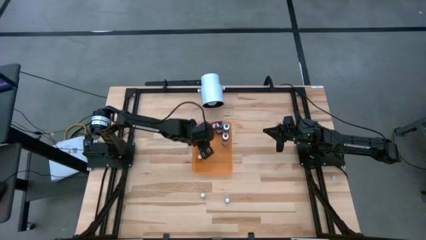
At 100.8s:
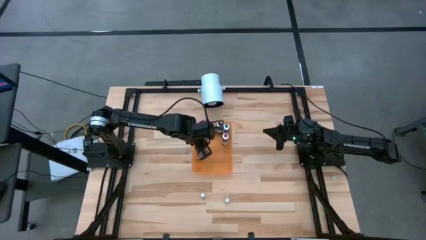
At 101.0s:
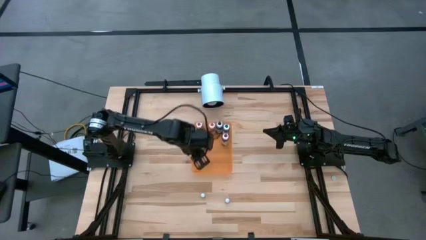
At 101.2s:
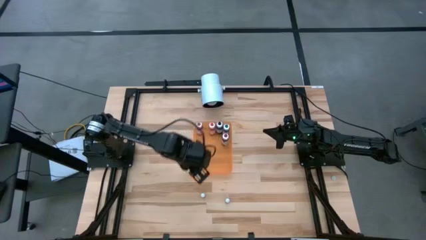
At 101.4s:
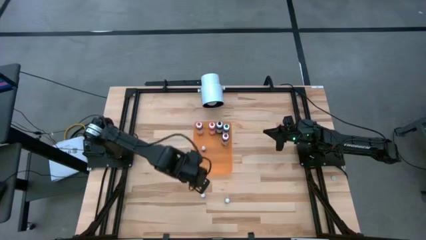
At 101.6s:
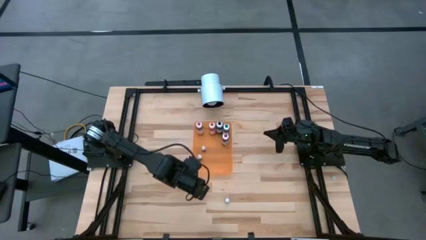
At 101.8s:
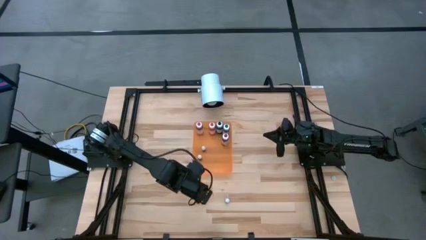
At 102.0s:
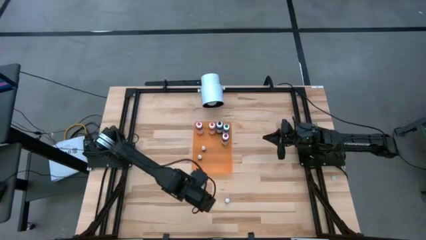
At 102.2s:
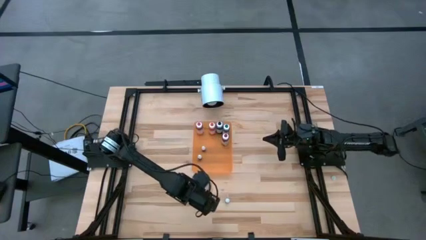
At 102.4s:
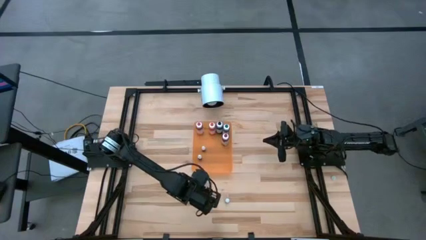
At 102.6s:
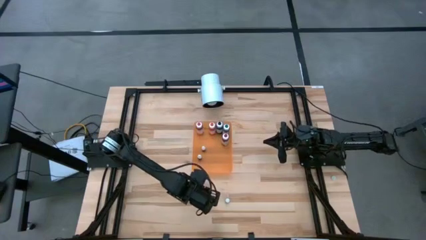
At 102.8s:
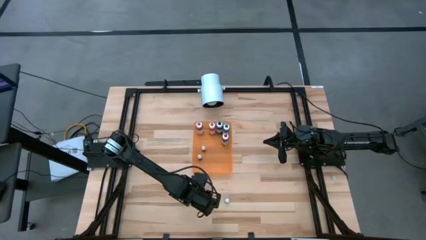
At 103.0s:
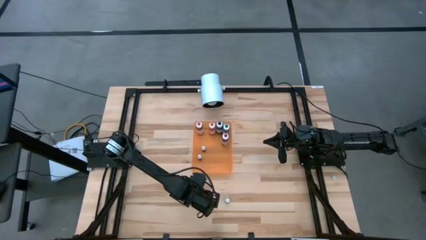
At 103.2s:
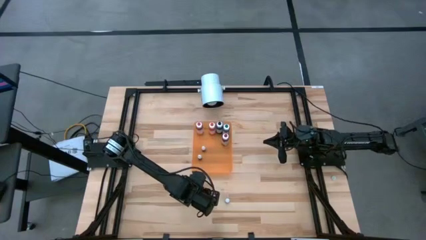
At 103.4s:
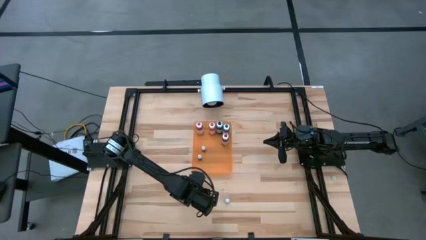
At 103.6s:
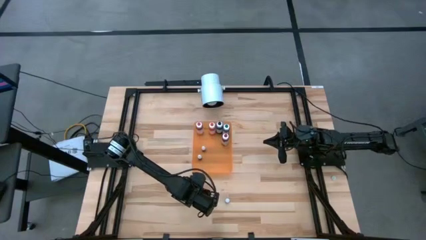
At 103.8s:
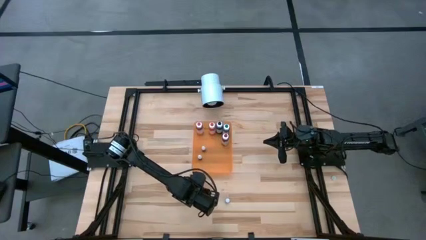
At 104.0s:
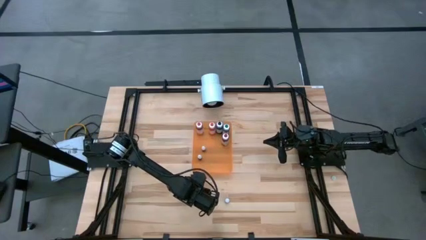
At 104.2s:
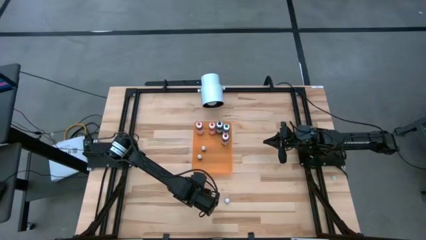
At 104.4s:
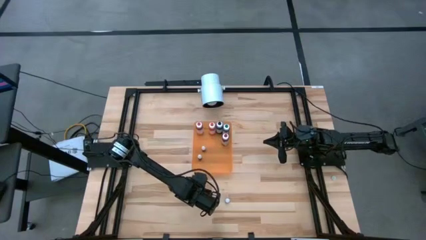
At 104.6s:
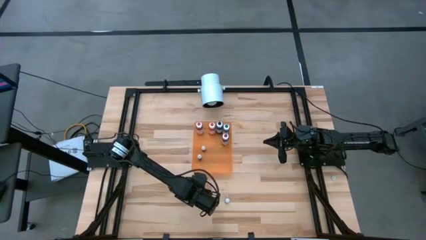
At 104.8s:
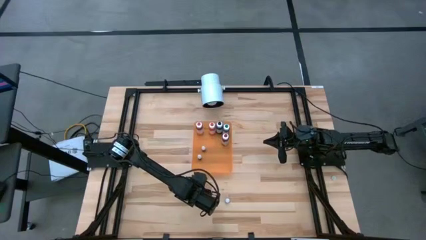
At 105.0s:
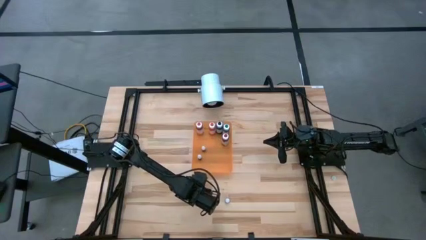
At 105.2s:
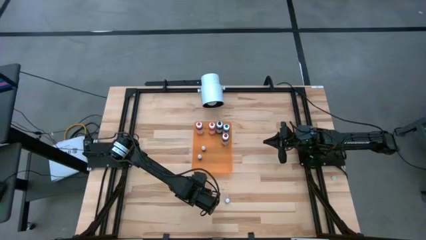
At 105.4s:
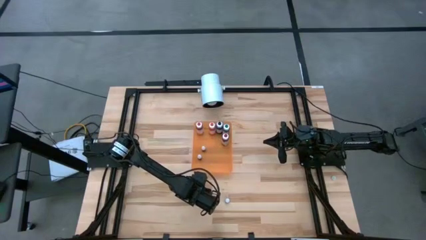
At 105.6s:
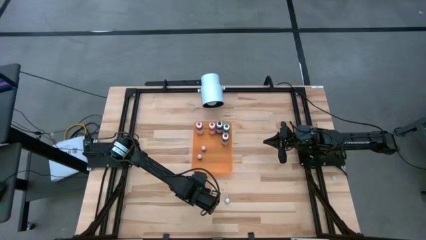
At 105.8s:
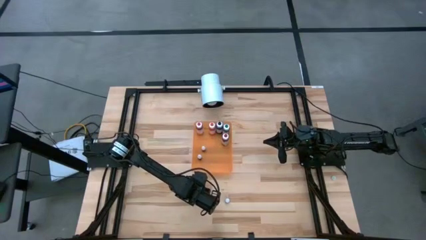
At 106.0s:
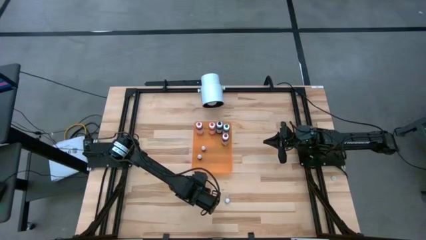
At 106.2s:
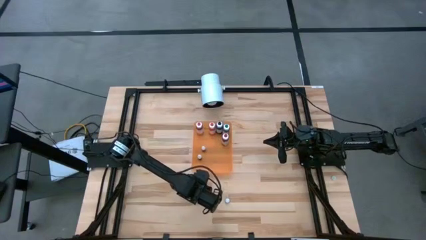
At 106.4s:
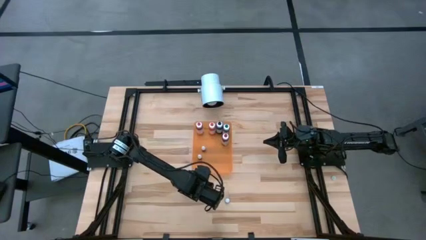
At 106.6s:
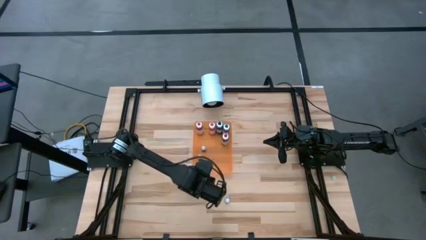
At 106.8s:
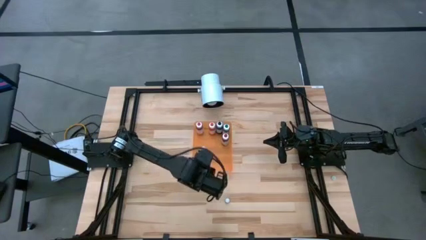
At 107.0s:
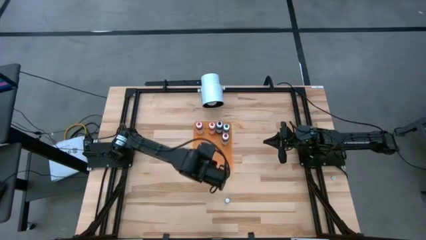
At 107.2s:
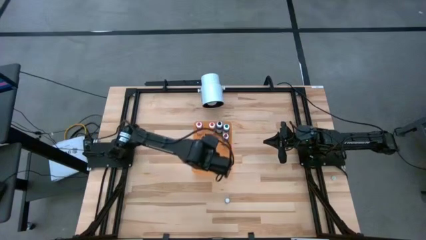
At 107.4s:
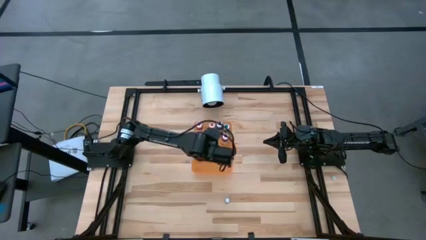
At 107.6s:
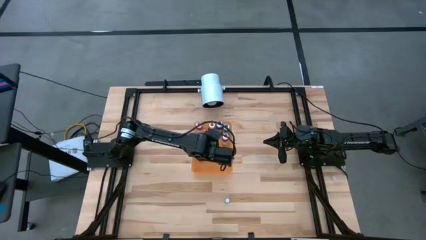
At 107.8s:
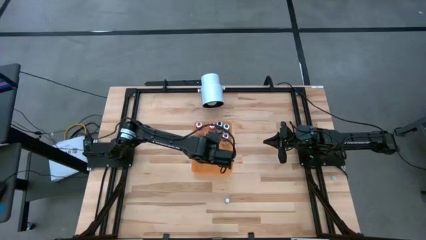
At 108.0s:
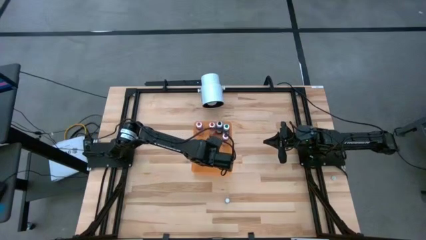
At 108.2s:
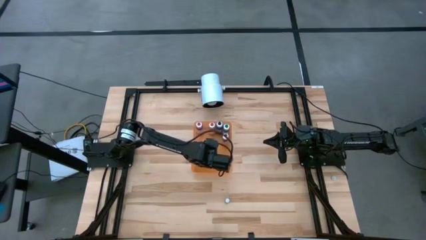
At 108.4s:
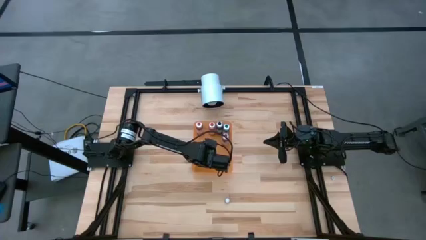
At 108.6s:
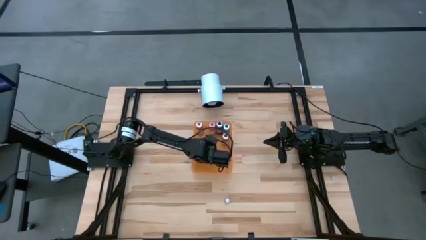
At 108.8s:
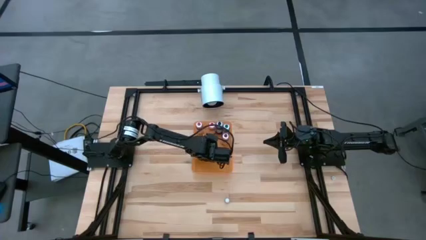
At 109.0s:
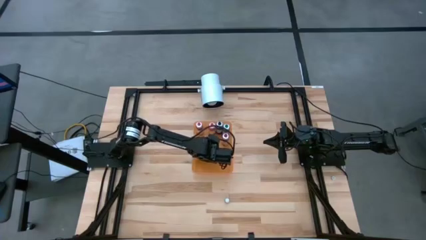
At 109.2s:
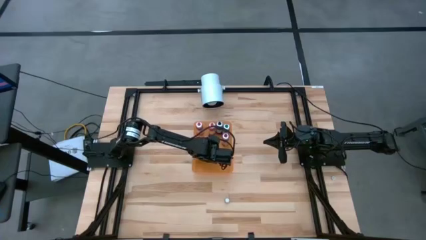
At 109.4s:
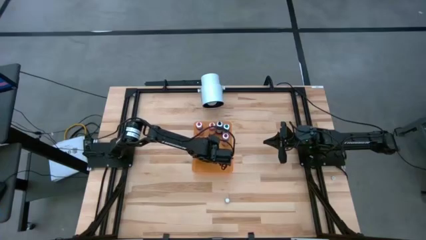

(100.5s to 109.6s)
Task: Pick & Place food coloring
Put the small black food coloring bottle into the bin

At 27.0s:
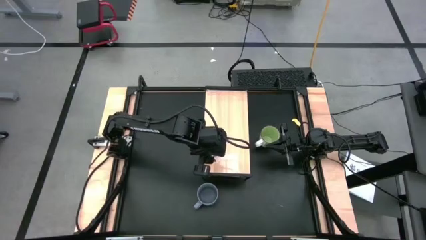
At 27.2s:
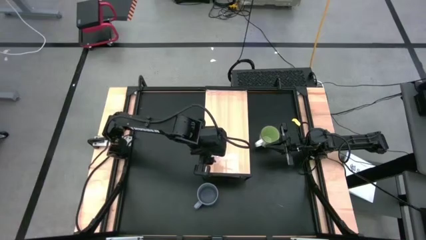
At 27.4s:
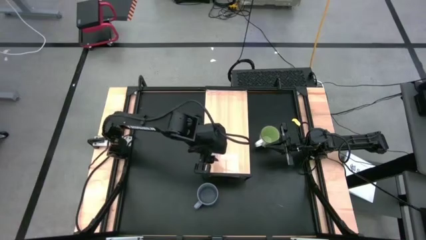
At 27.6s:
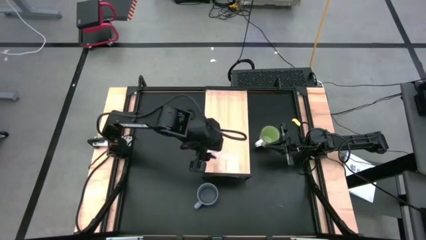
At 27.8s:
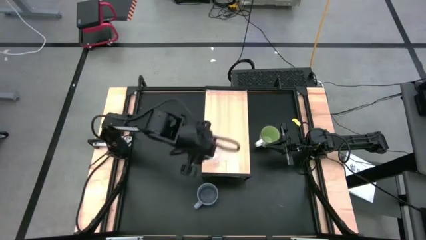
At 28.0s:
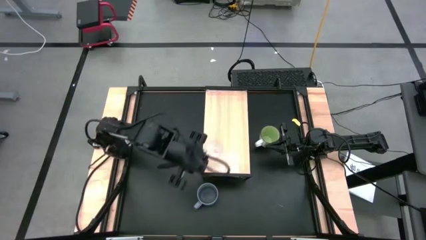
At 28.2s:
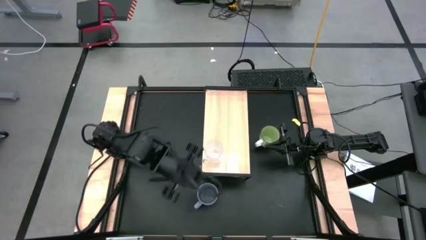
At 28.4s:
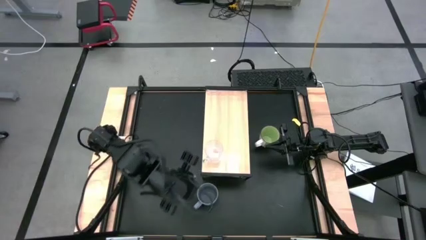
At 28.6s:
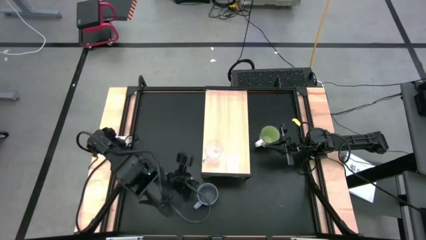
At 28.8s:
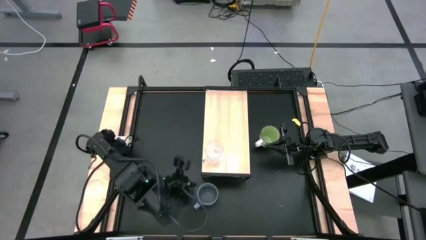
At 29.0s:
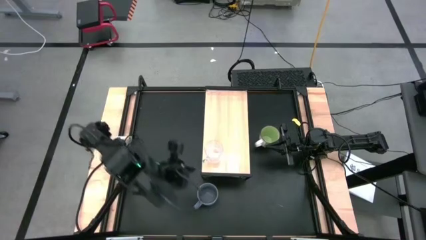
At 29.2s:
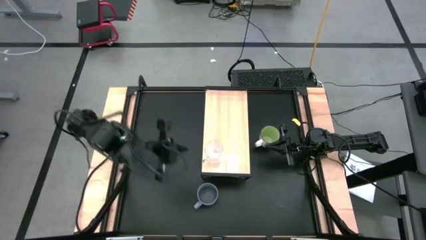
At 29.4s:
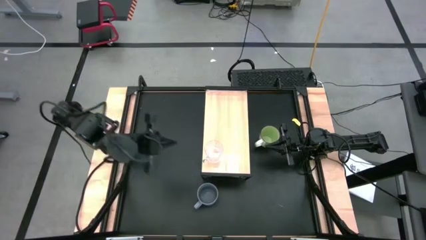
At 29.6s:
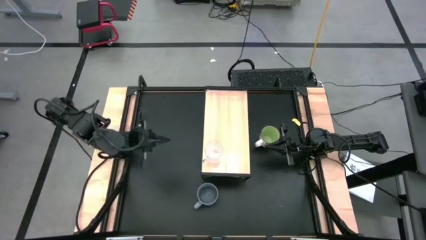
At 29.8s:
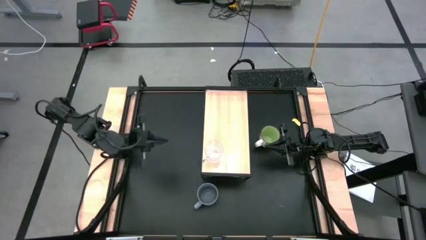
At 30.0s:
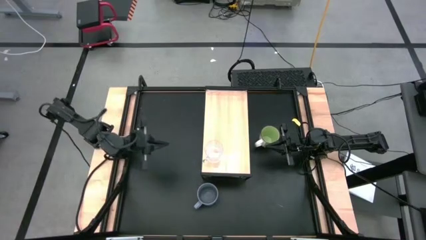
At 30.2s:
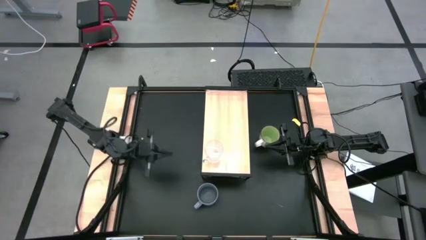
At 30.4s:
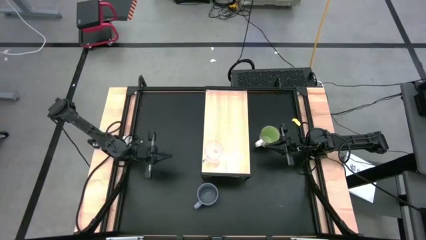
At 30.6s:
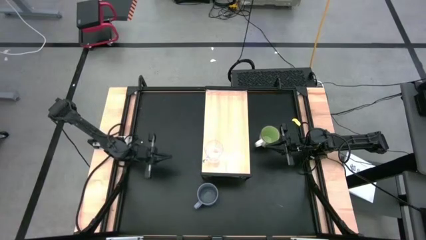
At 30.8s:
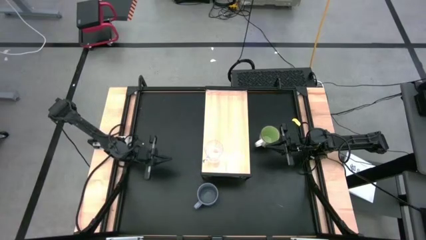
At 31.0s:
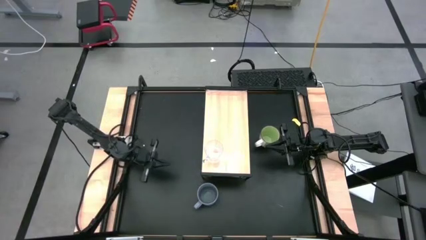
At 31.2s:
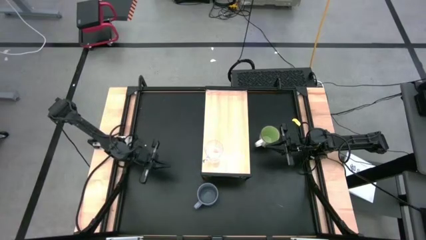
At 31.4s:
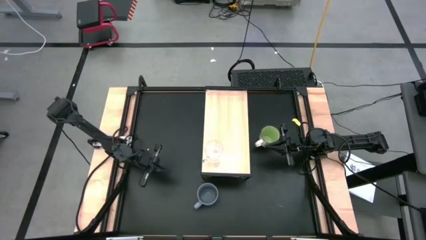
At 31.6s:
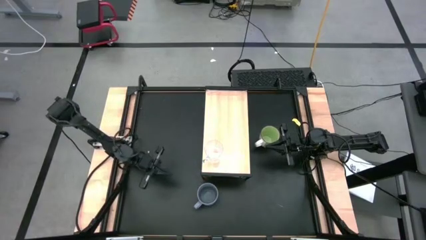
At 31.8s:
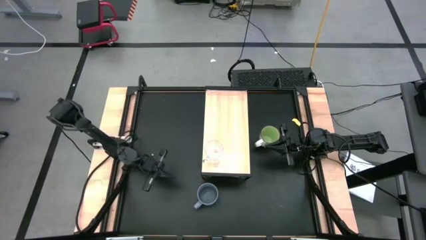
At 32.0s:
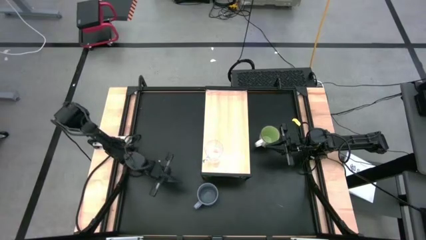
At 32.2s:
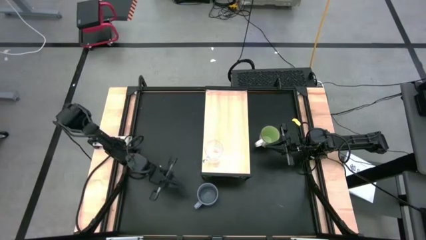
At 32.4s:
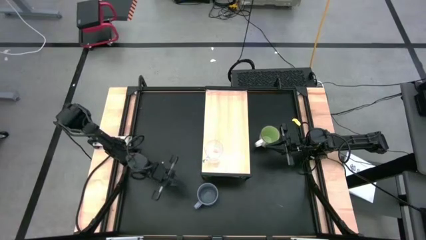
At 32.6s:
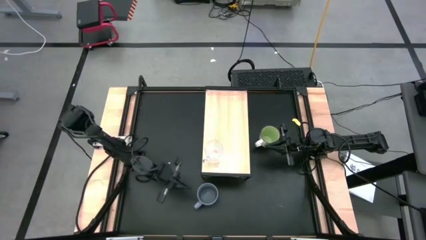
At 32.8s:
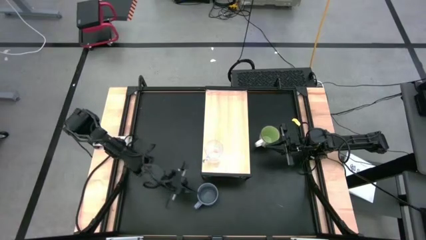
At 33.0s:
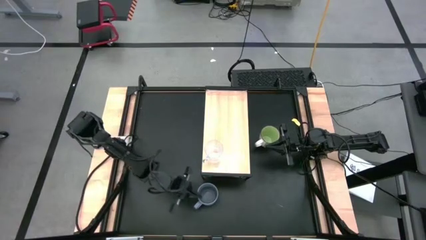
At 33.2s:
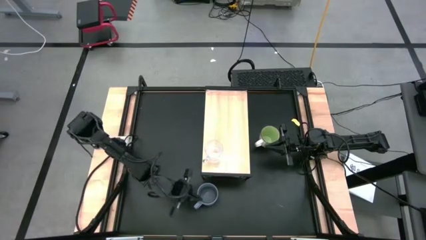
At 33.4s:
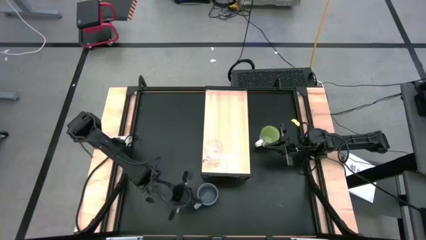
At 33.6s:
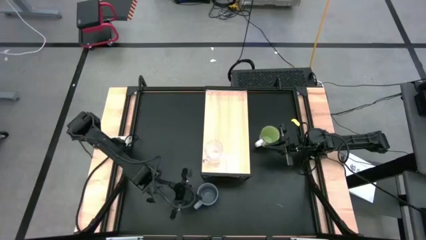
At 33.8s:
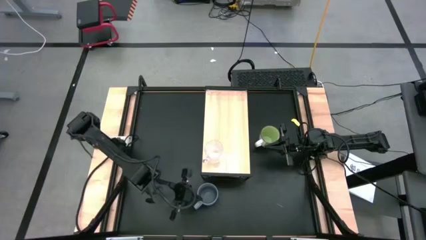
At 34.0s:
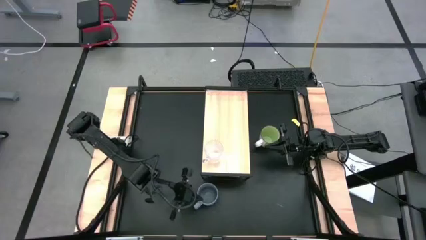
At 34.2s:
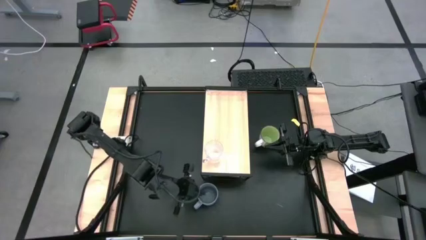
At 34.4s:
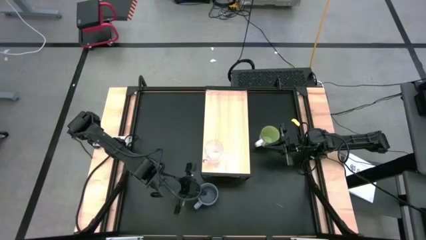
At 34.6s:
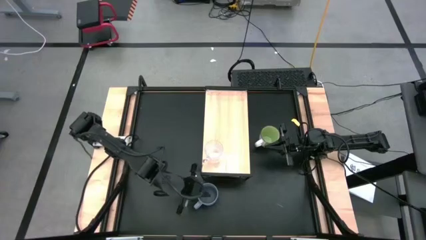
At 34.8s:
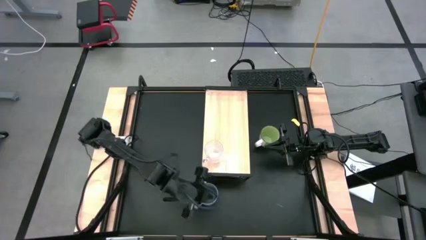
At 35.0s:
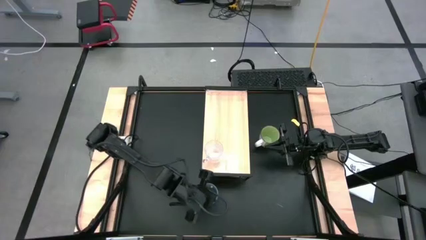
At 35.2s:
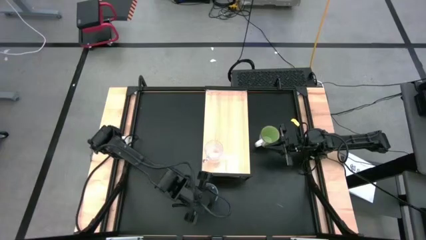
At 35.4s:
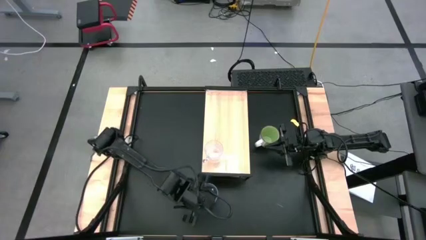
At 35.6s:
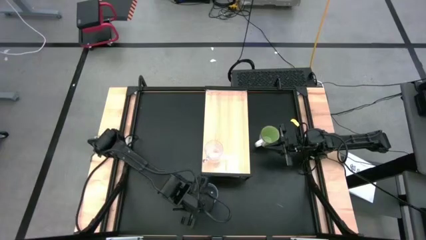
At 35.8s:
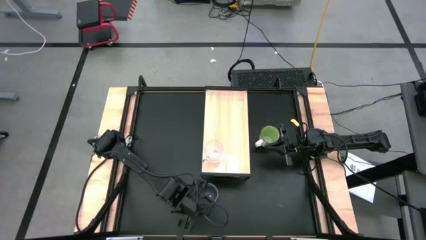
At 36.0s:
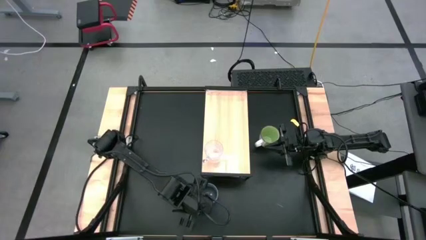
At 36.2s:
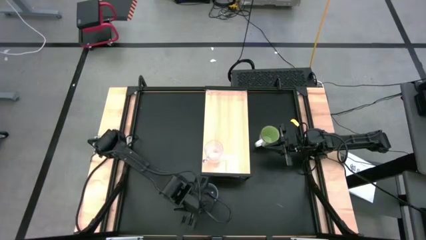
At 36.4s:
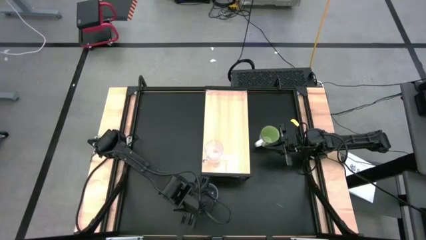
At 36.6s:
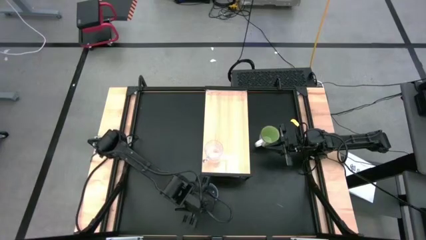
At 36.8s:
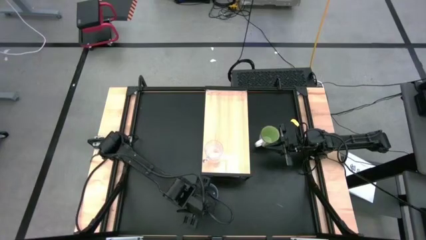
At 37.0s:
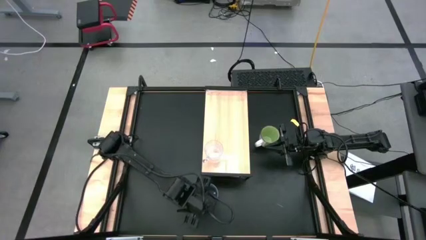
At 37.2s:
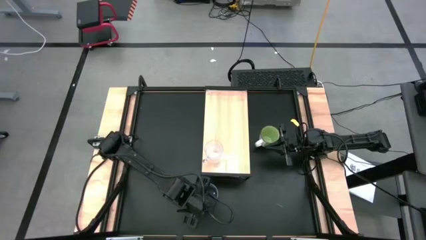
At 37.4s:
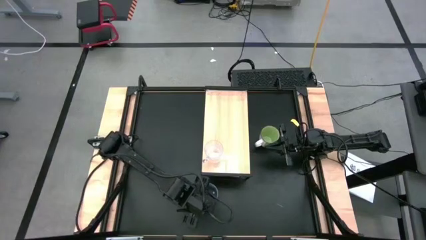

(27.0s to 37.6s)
Task: Stack small to large cups/mugs on shelf
Put the gray mug on the shelf
